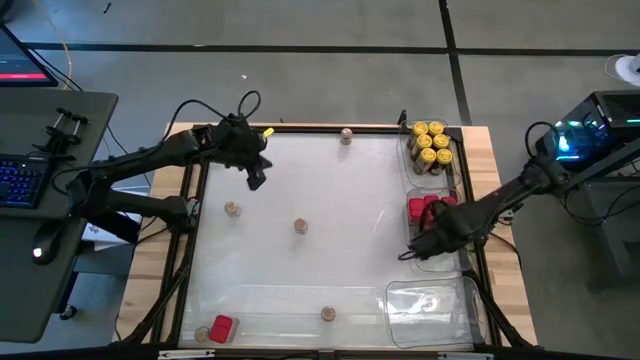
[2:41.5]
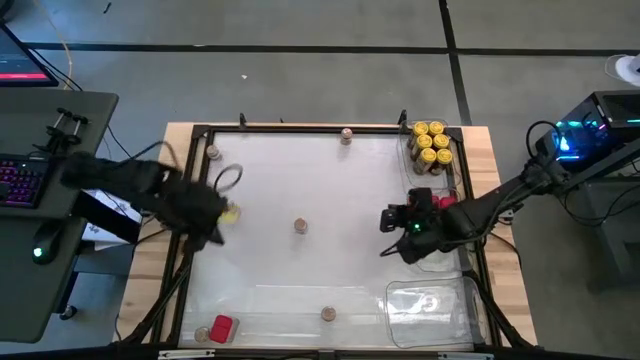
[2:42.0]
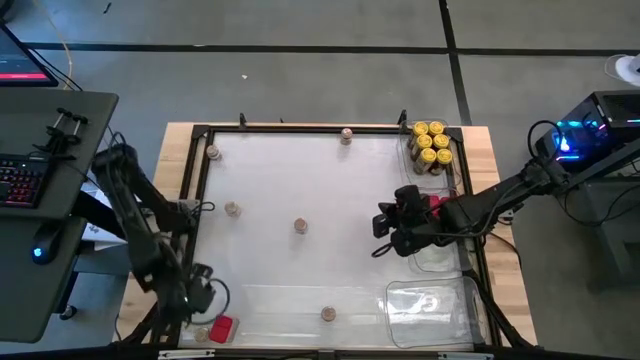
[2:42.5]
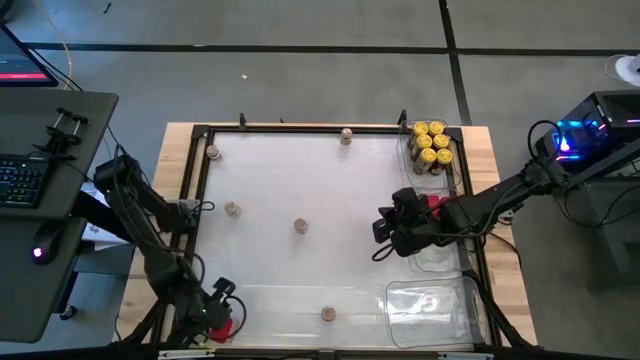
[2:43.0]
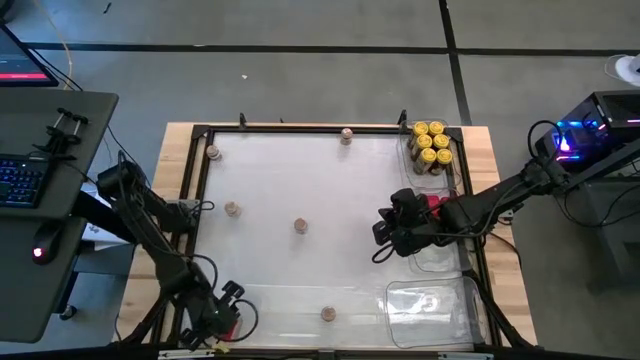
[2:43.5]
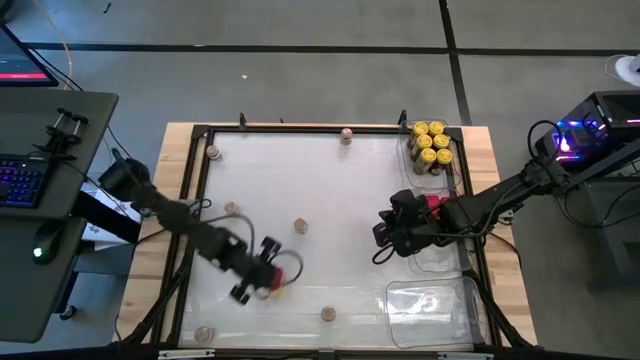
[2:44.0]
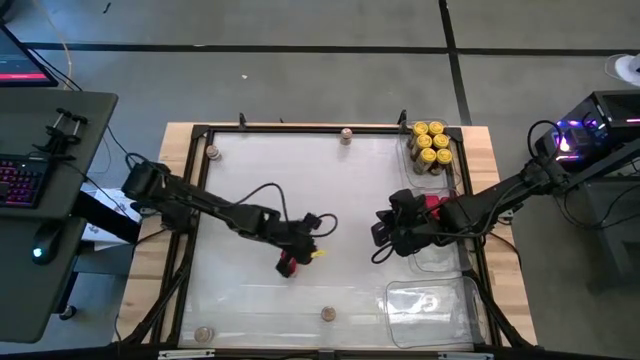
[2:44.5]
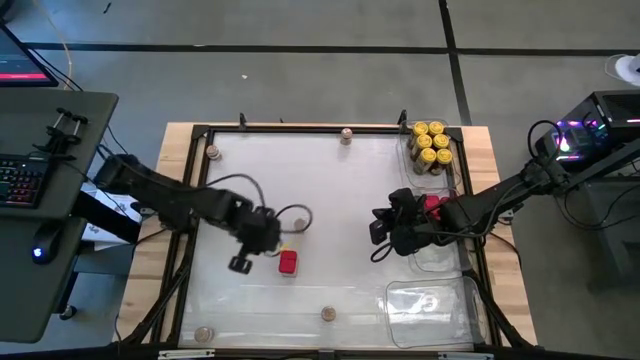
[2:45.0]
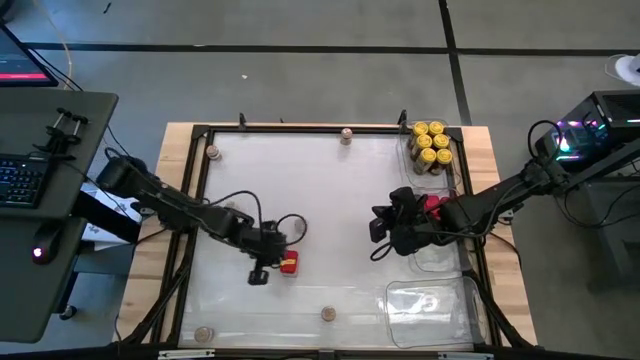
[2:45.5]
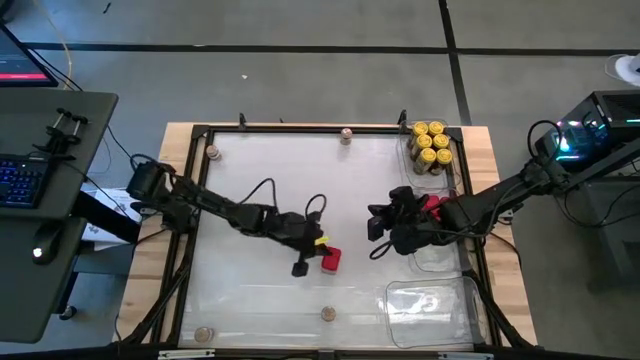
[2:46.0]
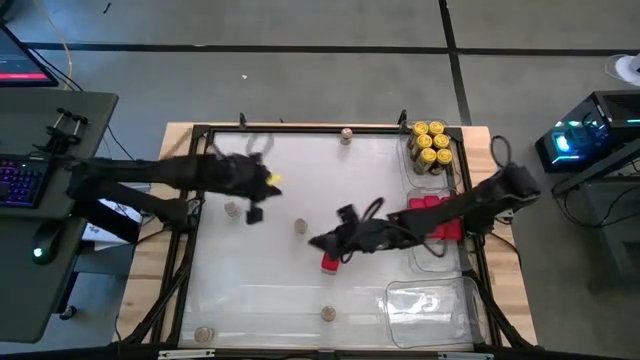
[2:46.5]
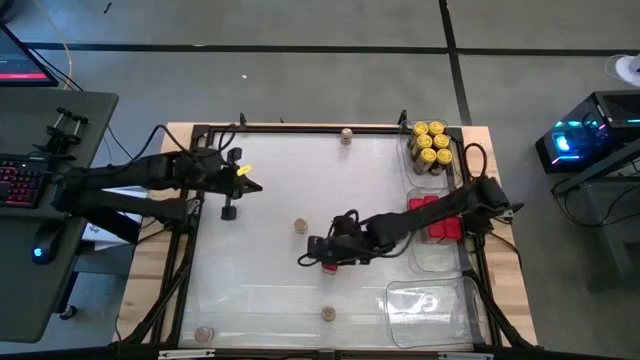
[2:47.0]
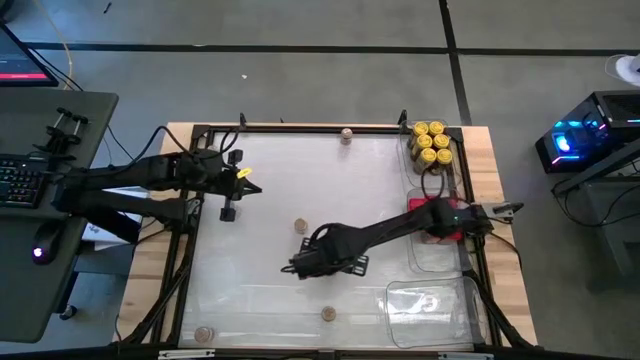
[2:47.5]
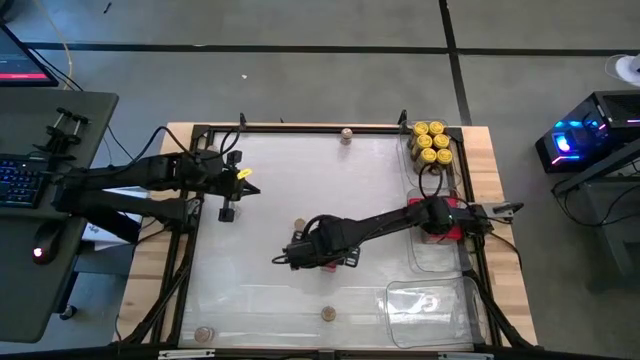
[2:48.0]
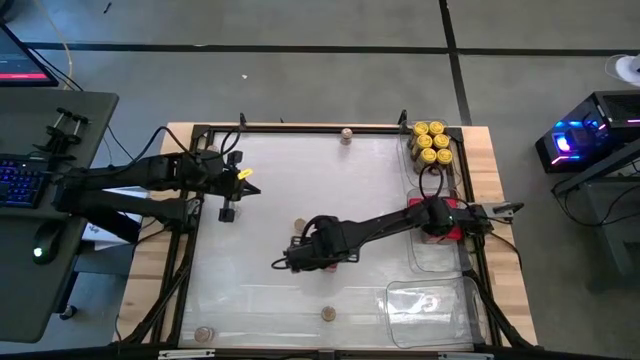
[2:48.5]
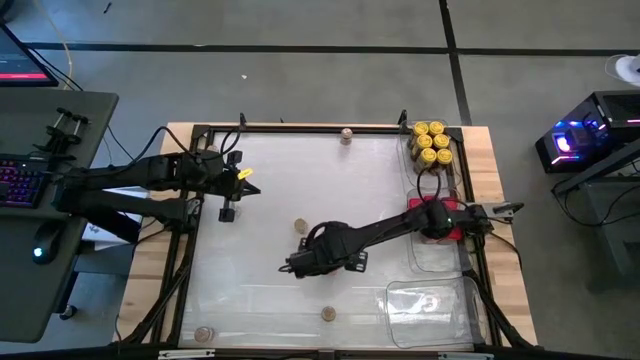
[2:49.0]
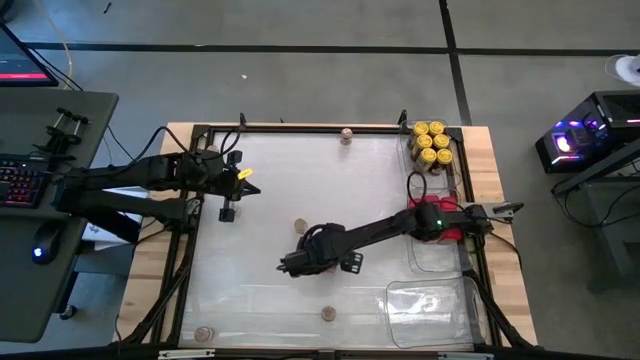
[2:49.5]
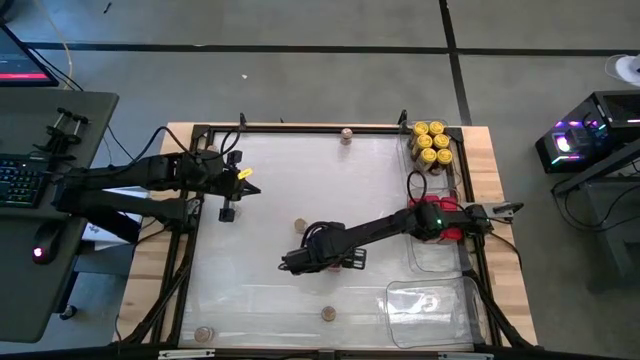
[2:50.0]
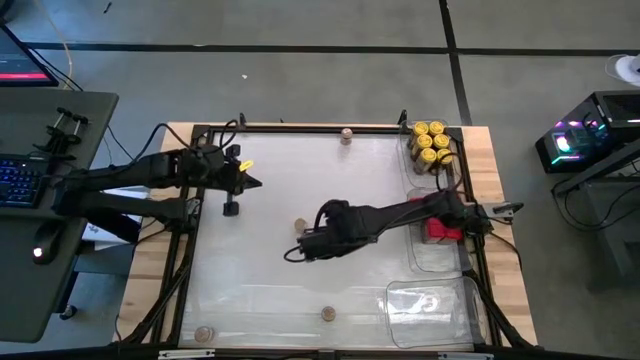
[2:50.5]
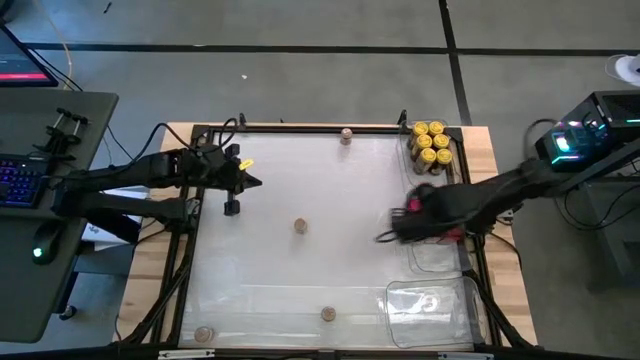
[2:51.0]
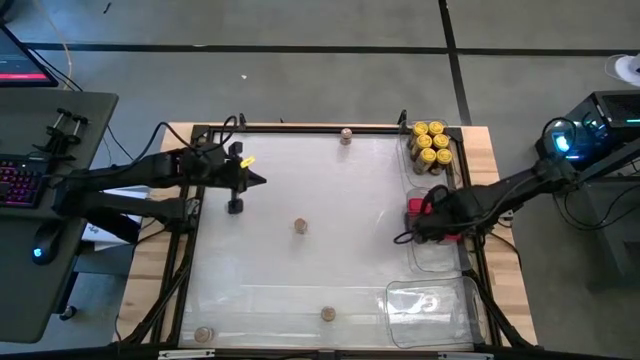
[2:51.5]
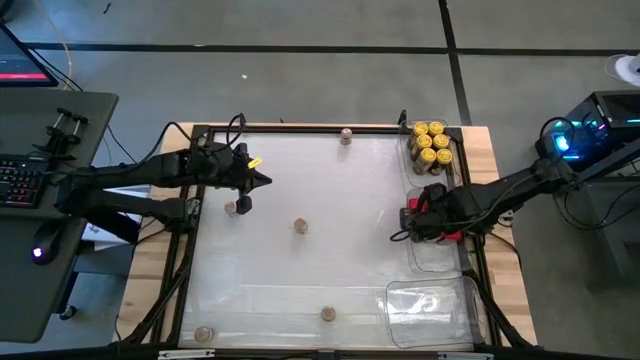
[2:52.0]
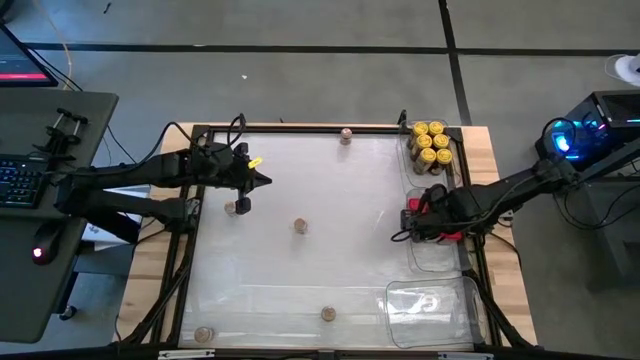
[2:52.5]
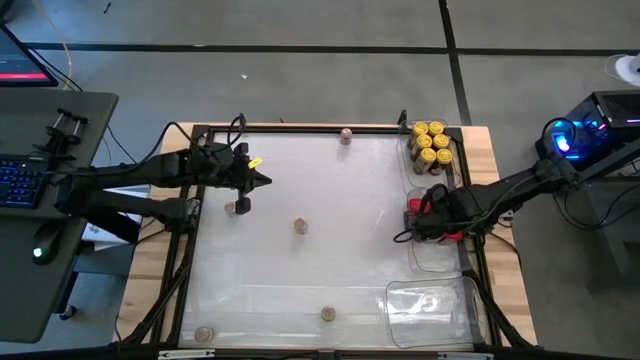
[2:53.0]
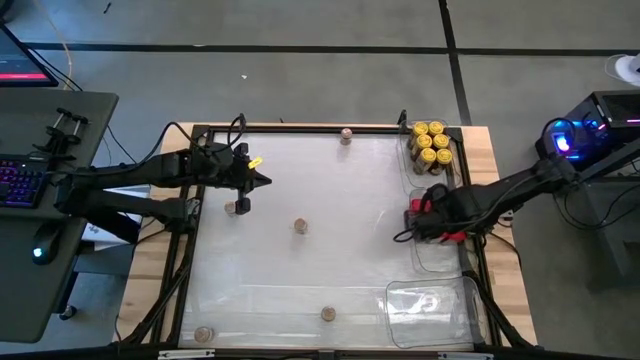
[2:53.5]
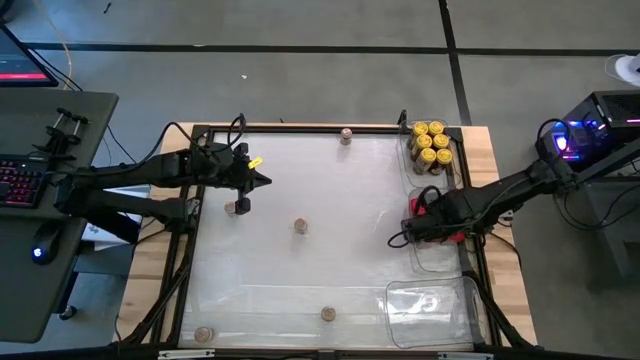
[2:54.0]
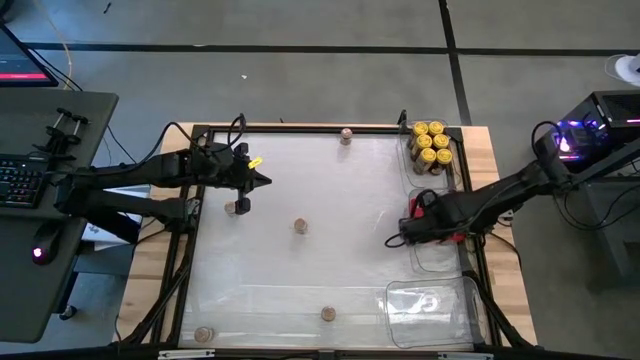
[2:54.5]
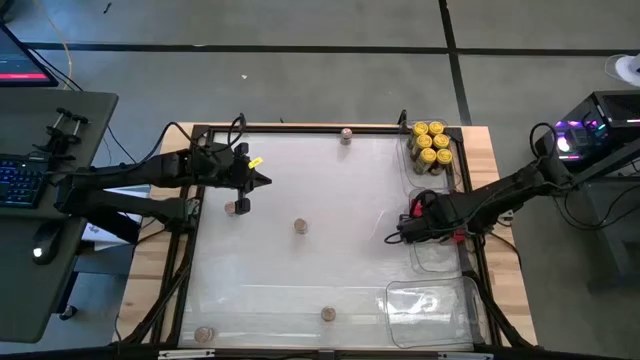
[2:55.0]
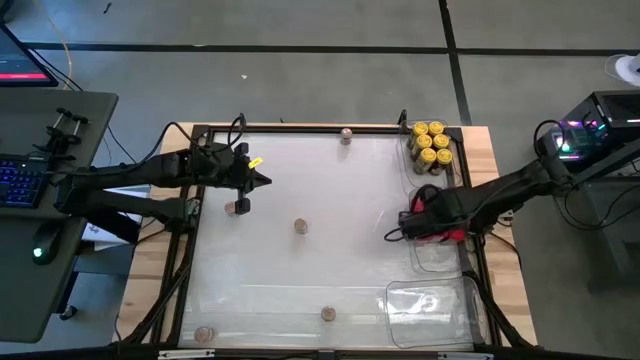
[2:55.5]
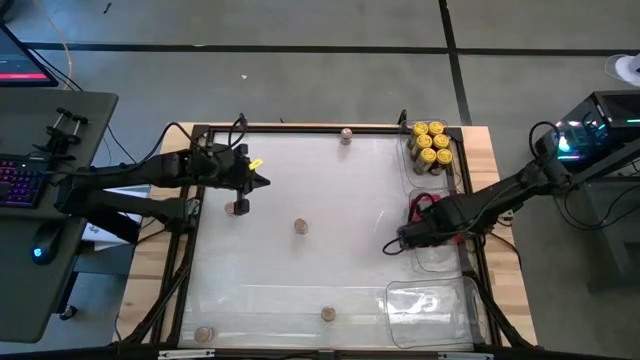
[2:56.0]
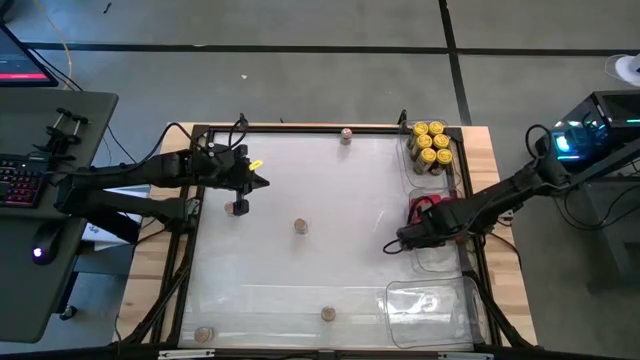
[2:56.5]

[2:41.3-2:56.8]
Task: Sort spices by type
Put the red seasoning can into the middle transparent bin

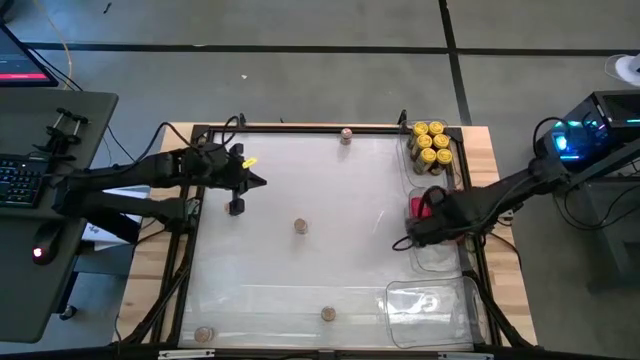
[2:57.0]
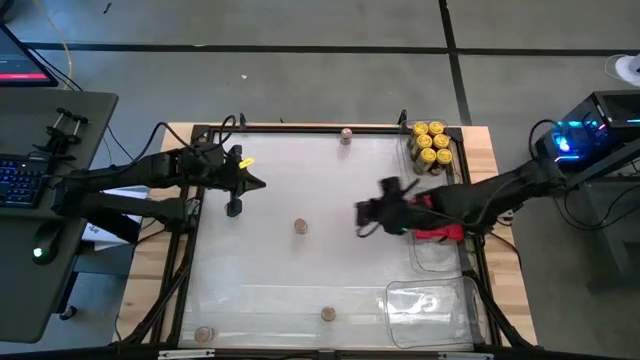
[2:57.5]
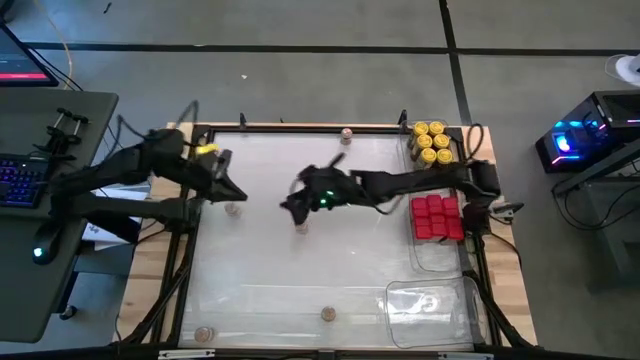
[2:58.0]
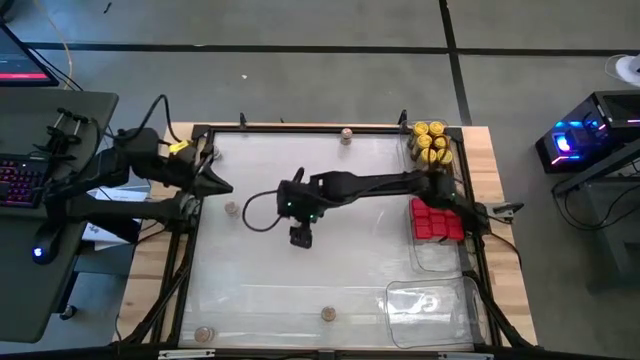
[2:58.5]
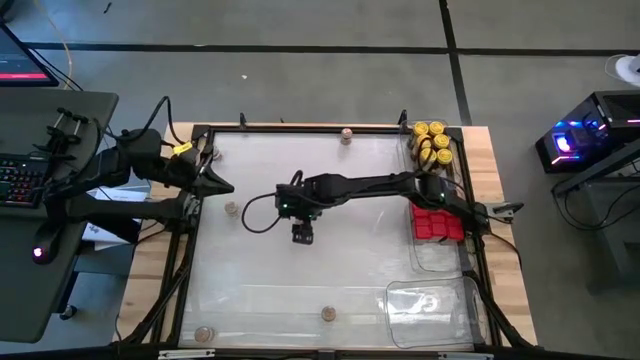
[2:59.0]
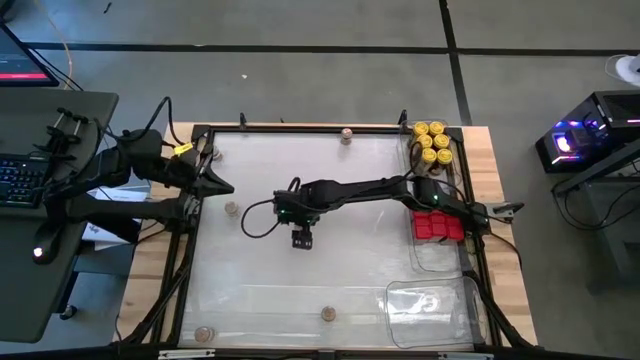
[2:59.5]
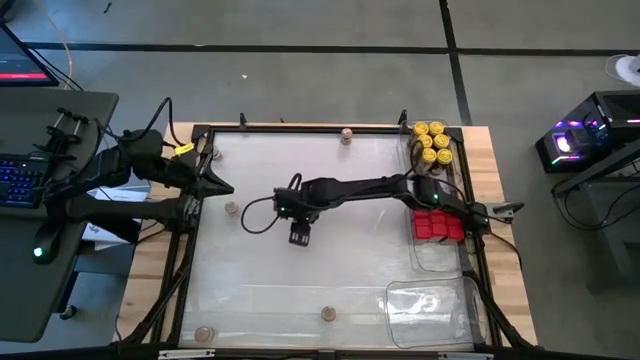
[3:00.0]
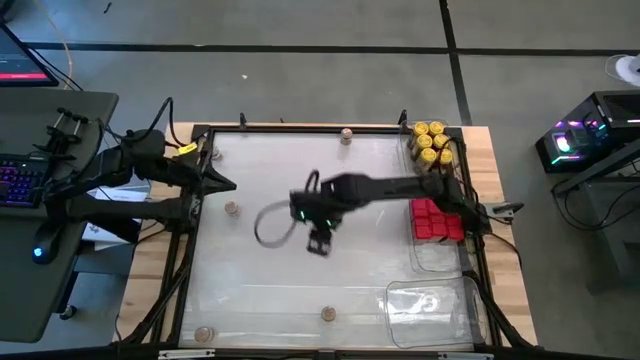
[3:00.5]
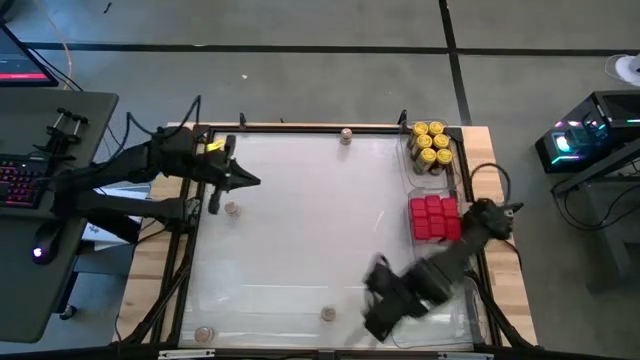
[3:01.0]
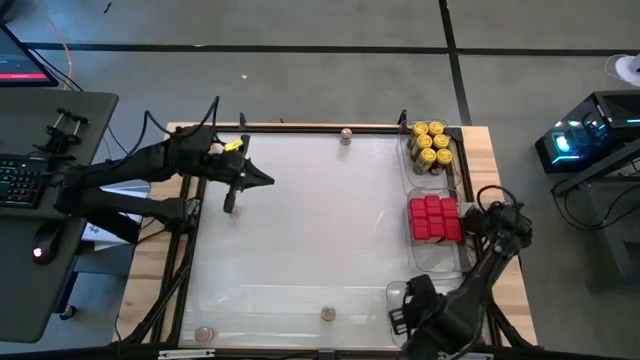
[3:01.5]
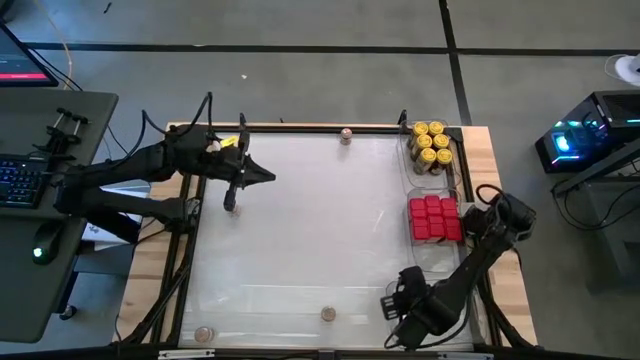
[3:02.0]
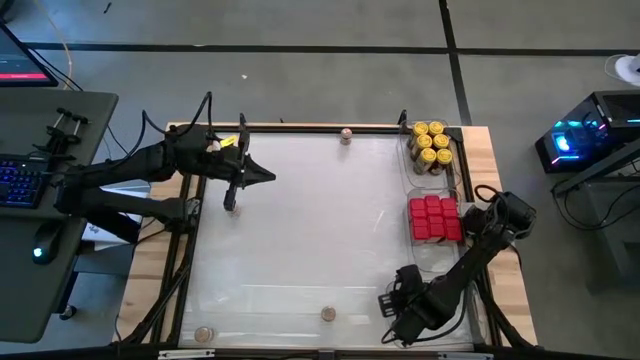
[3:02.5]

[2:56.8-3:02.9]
Put the brown seasoning bottle into the bottom transparent bin
